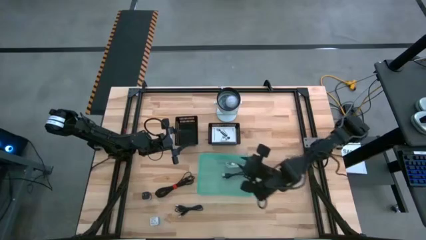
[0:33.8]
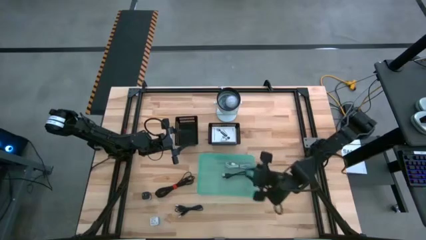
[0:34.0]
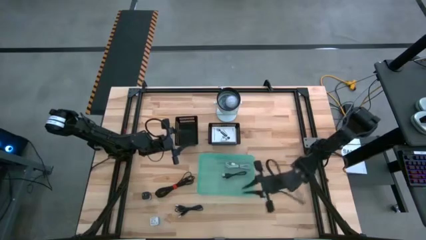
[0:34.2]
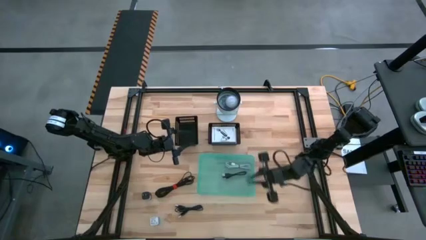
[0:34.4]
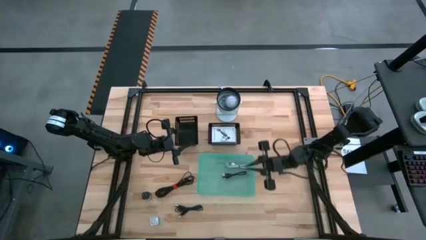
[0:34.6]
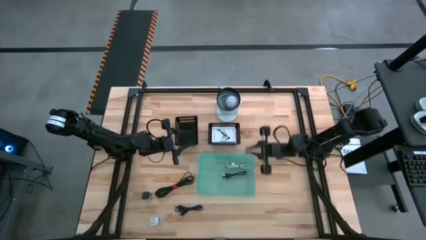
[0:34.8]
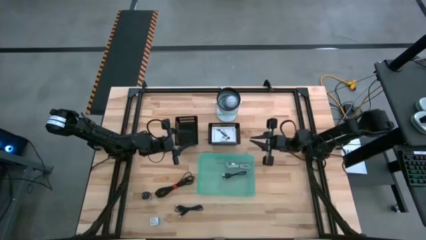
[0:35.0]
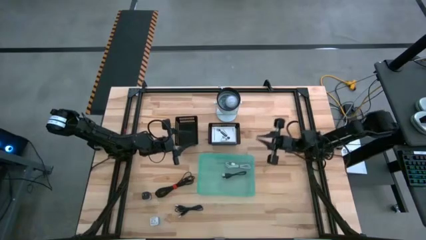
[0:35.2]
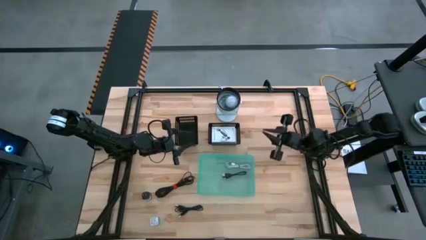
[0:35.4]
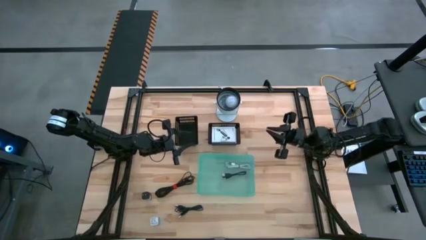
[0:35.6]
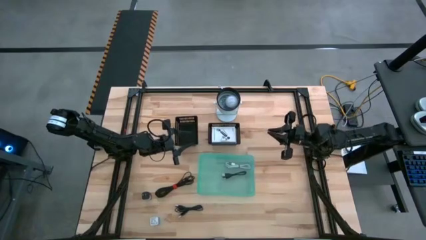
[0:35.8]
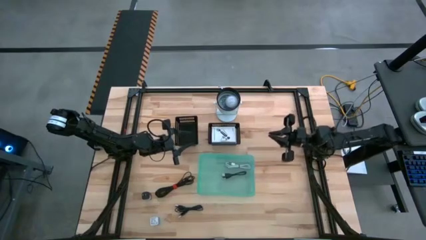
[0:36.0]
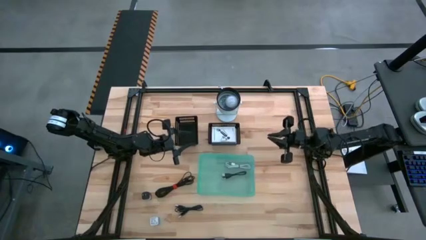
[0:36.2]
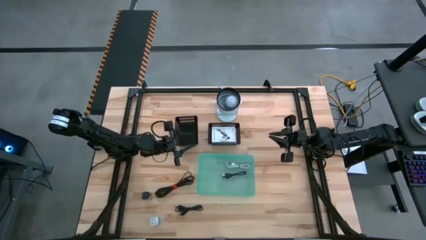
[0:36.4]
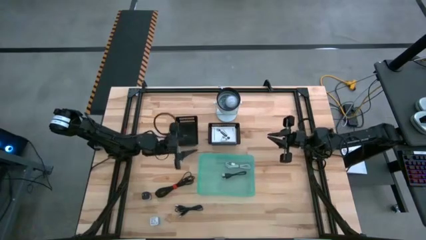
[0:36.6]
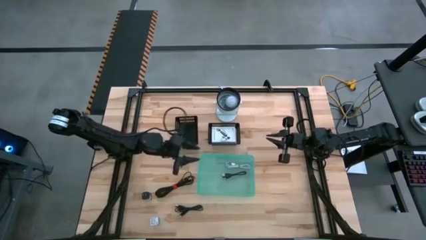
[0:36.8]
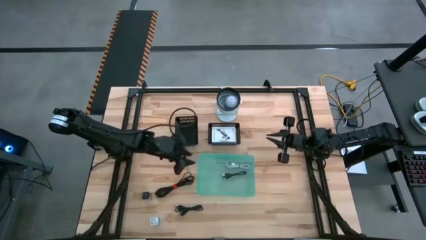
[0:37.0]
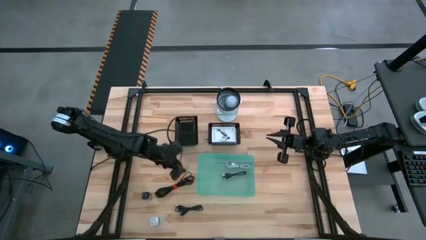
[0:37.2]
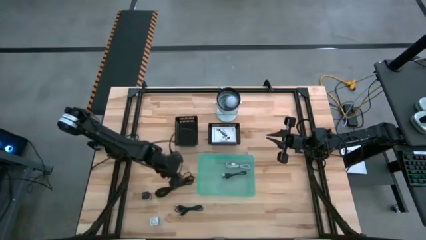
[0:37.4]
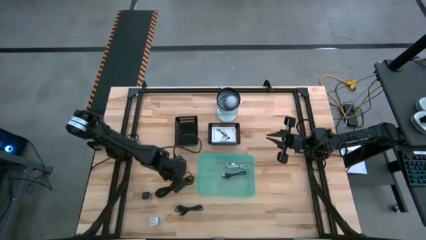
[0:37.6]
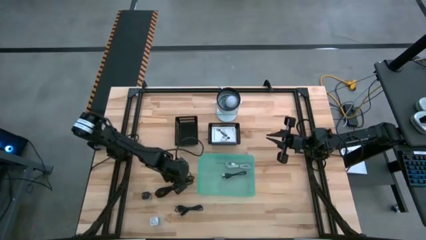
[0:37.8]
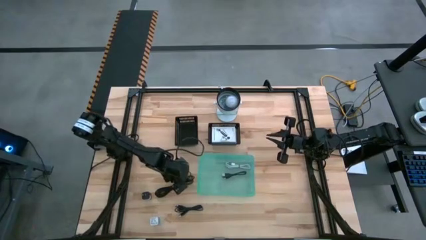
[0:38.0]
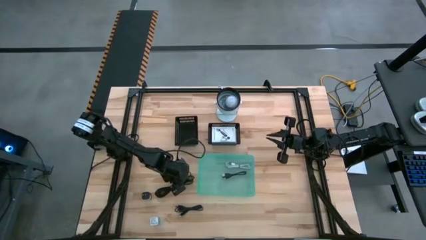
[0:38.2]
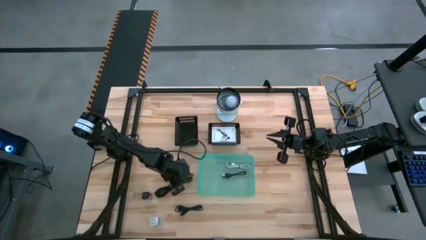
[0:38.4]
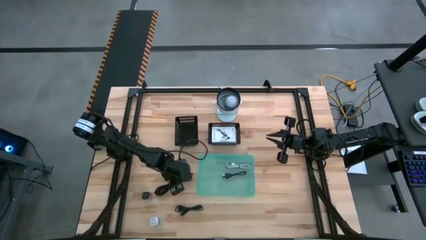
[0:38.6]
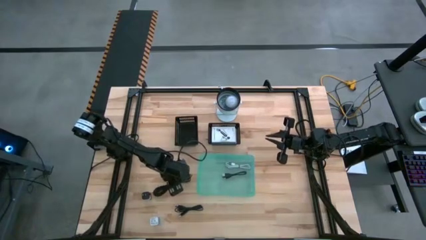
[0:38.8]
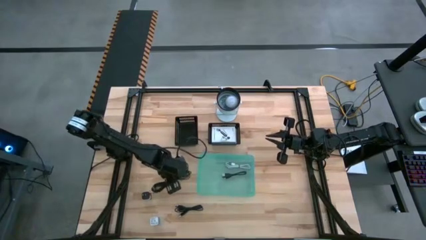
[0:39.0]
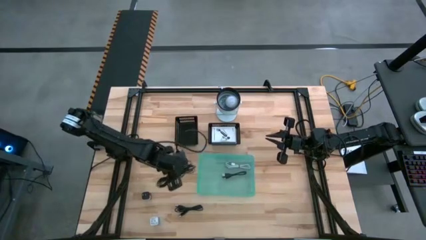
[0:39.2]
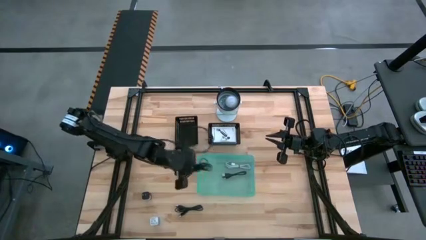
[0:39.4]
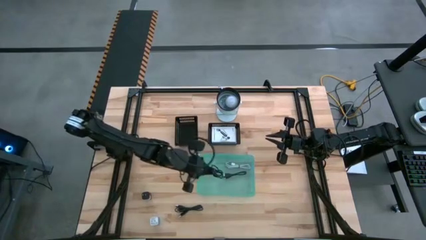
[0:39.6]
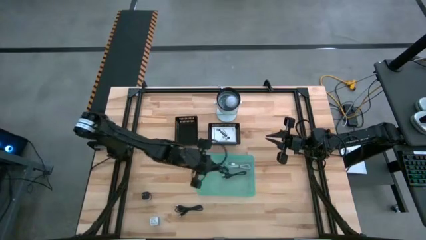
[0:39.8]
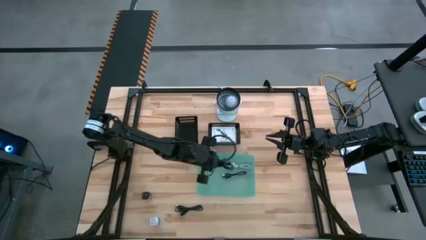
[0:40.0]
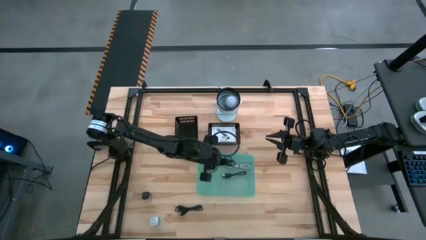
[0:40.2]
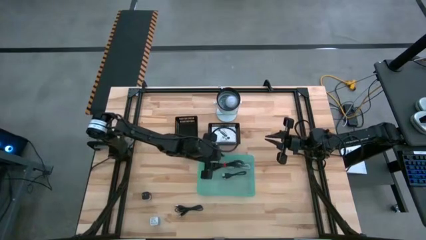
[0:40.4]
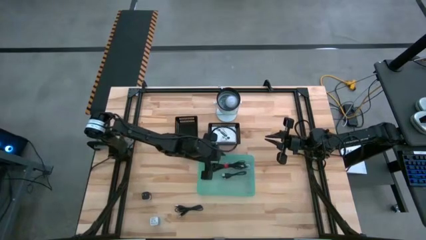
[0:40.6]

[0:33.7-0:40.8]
Task: Pick and place items into bin
Put the top black charger cable into the green bin

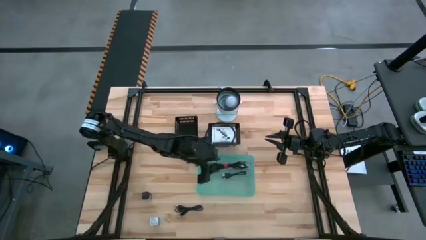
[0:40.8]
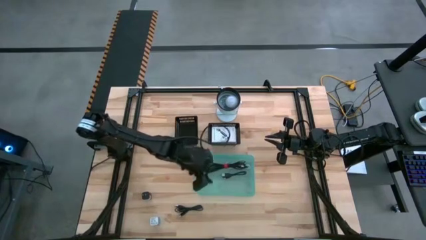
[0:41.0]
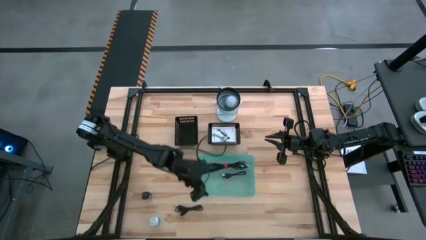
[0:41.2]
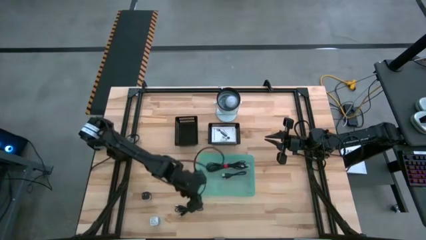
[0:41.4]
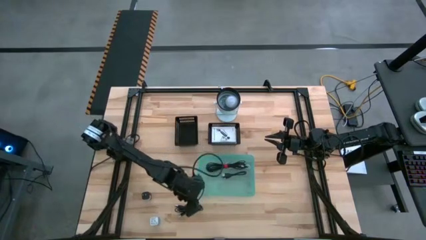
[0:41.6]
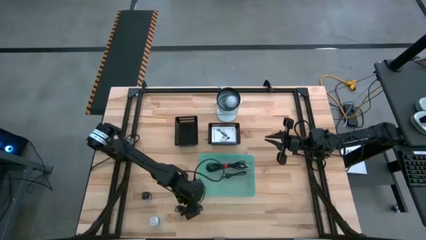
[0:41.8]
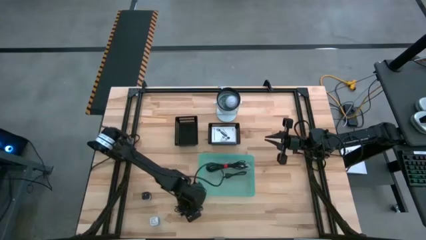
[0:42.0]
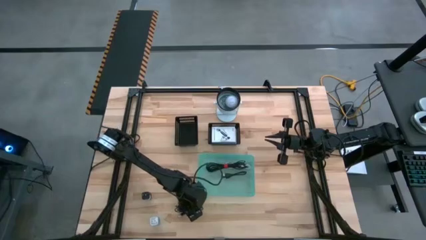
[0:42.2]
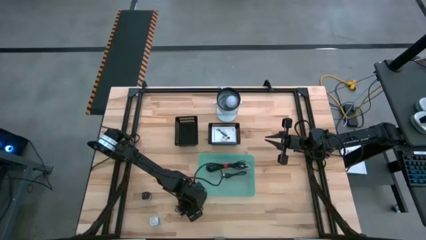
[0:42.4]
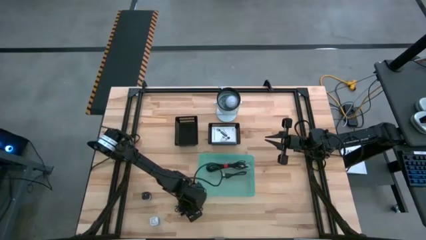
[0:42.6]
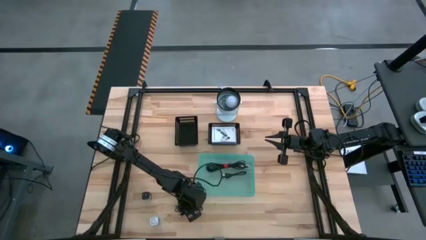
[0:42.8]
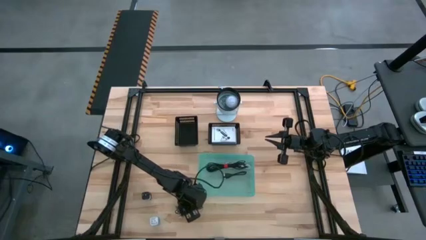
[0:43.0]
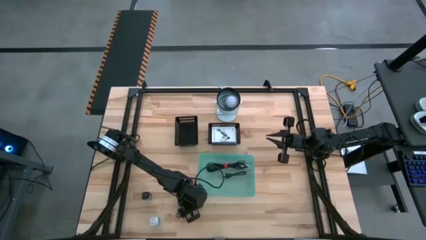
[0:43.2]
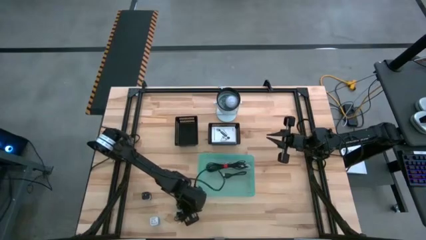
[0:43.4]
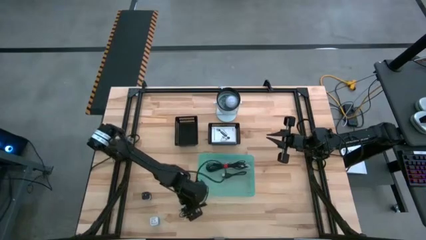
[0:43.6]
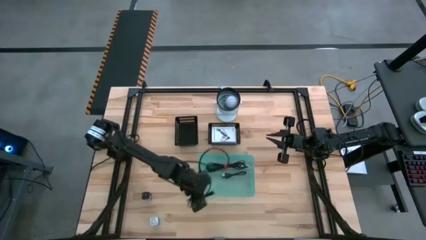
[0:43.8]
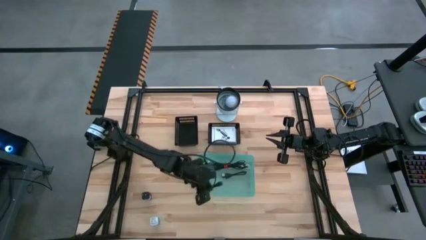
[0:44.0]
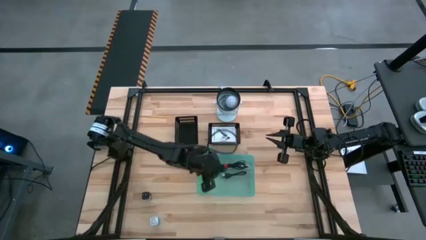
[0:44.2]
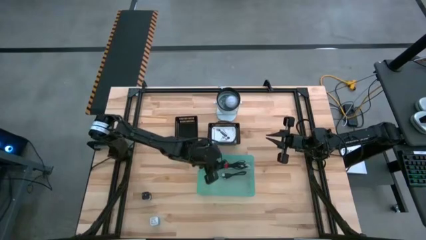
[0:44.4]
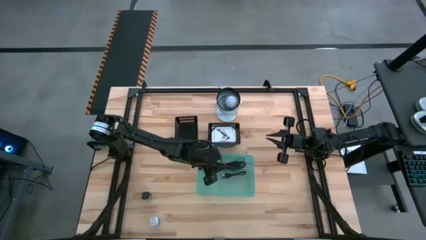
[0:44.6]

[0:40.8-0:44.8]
Put the black charger cable into the green bin

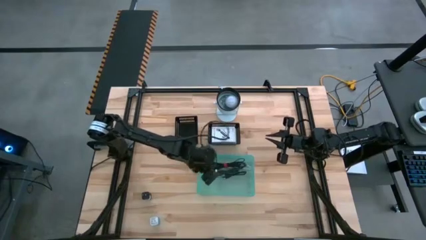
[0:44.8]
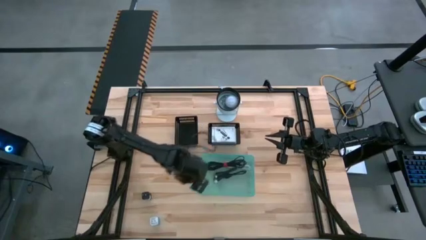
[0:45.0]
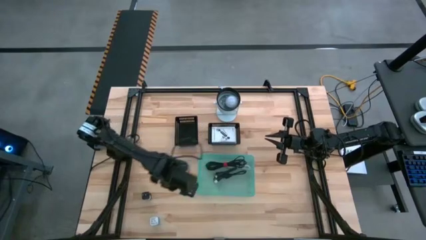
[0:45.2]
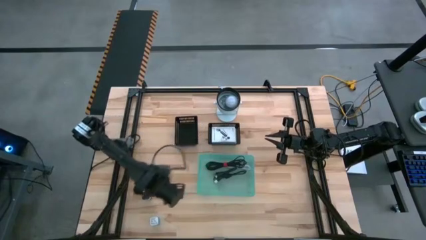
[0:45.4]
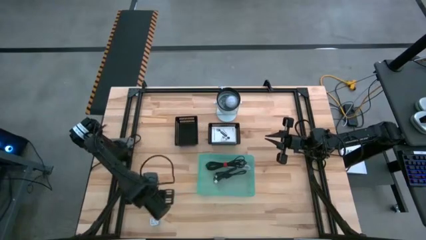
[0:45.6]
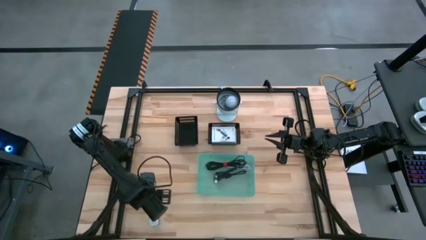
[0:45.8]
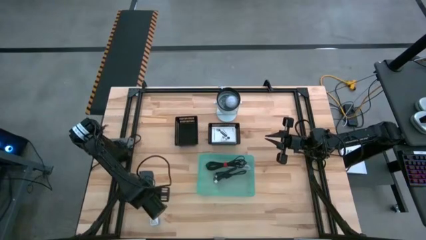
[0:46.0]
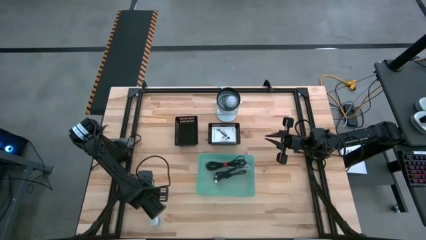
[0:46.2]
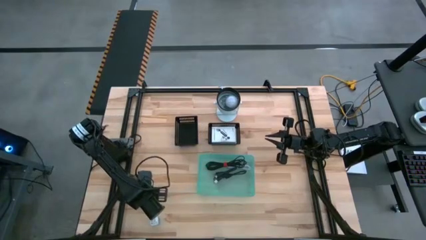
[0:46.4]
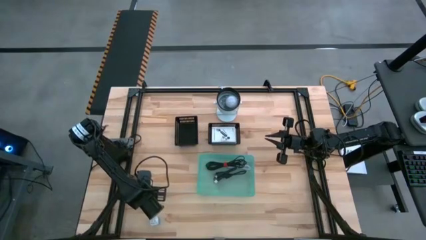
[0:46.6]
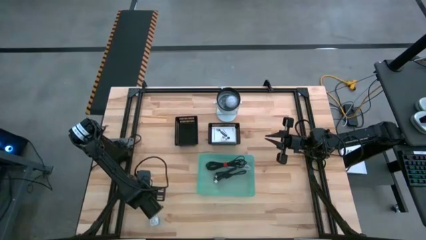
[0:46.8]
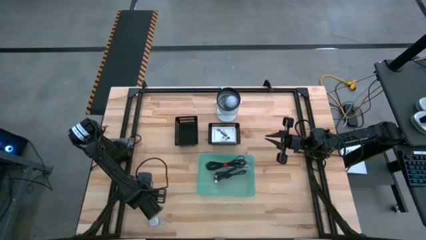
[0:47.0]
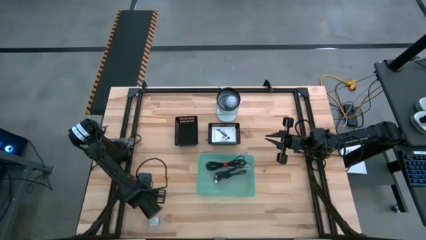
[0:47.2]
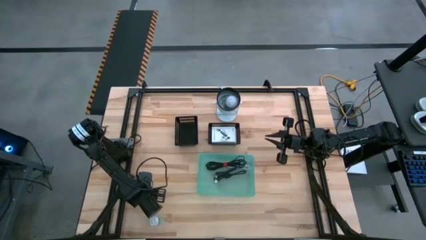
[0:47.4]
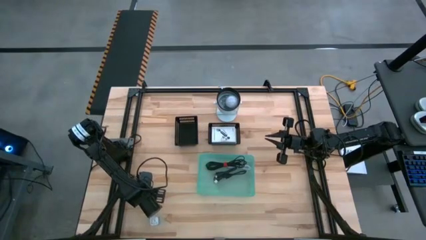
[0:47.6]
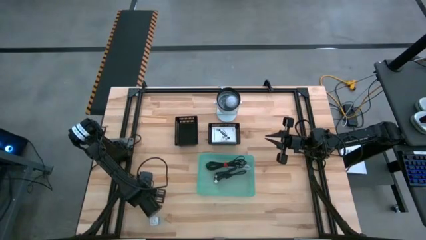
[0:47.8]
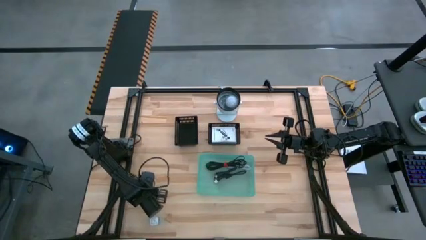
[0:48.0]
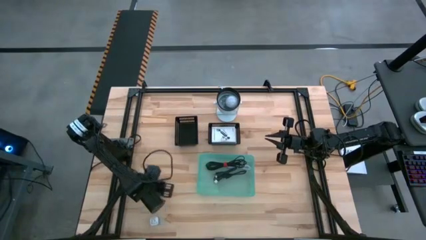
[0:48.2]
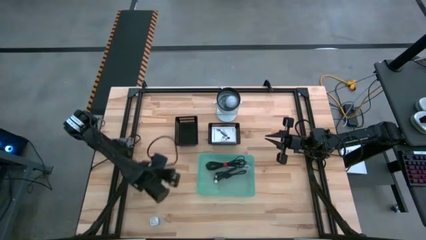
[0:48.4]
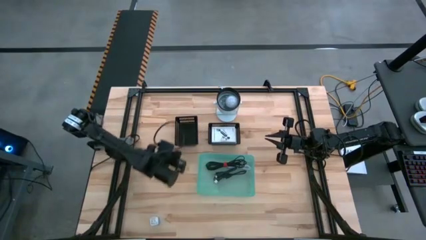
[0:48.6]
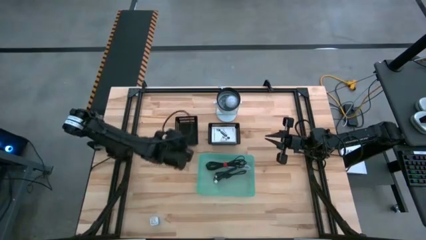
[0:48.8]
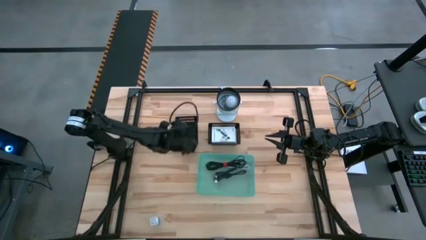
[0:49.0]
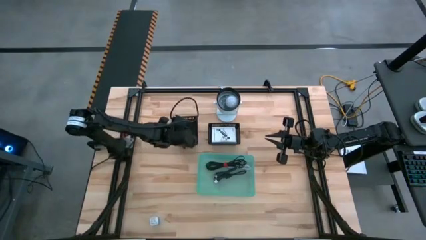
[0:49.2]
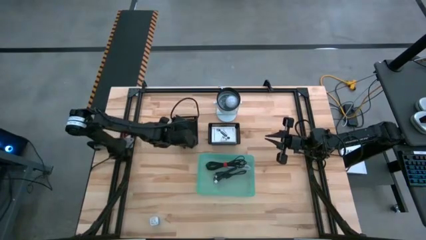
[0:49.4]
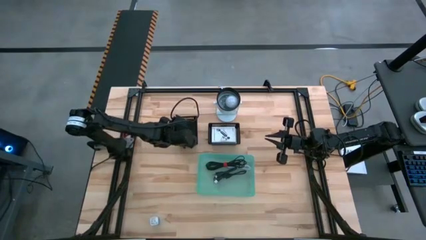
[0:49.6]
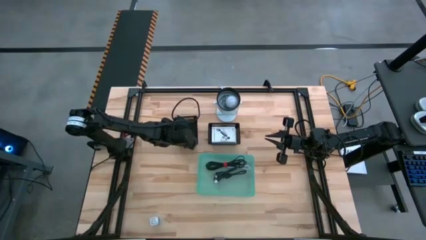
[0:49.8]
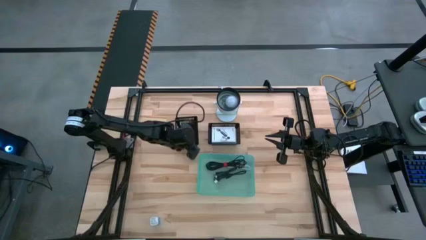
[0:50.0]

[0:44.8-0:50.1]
Put the black charger adapter into the left black bin
